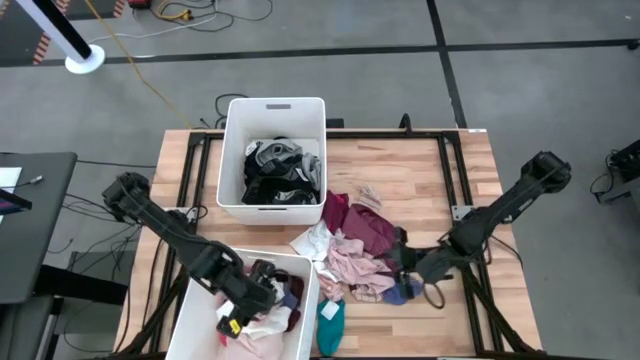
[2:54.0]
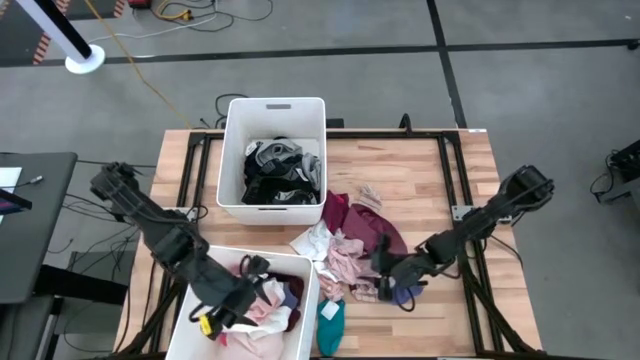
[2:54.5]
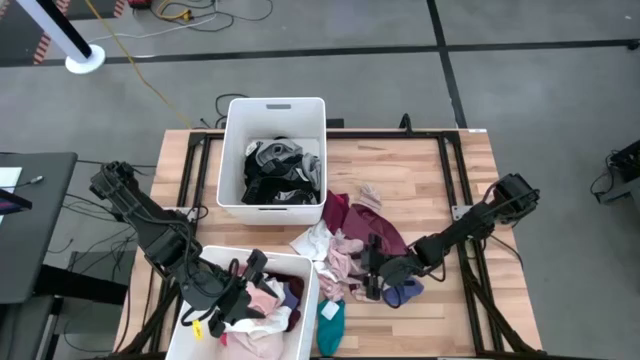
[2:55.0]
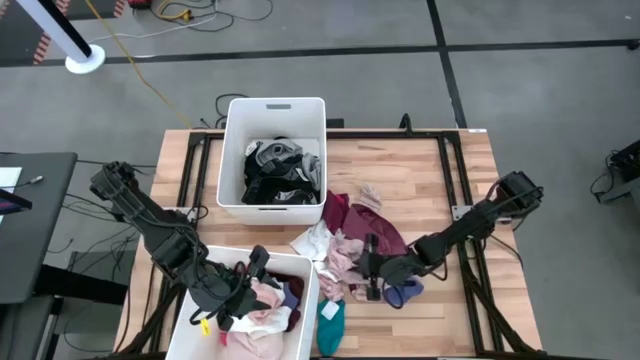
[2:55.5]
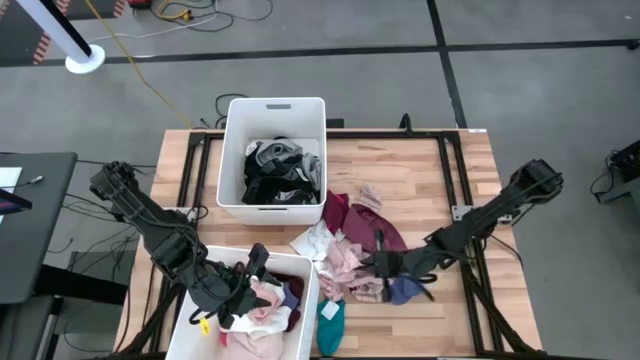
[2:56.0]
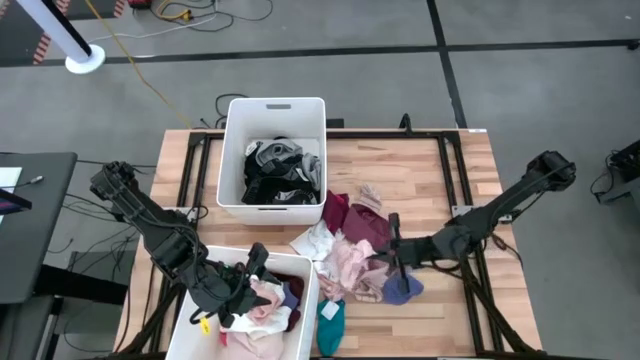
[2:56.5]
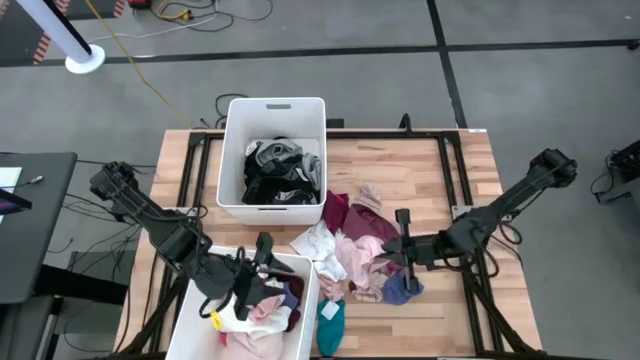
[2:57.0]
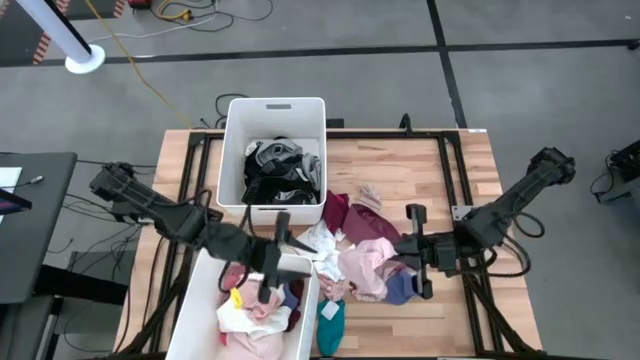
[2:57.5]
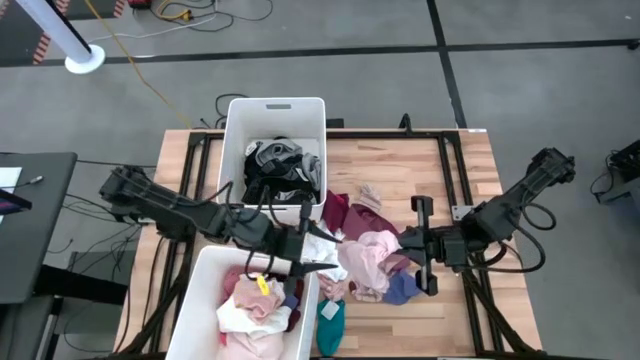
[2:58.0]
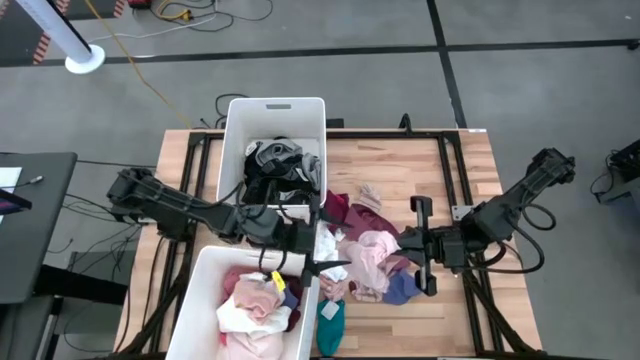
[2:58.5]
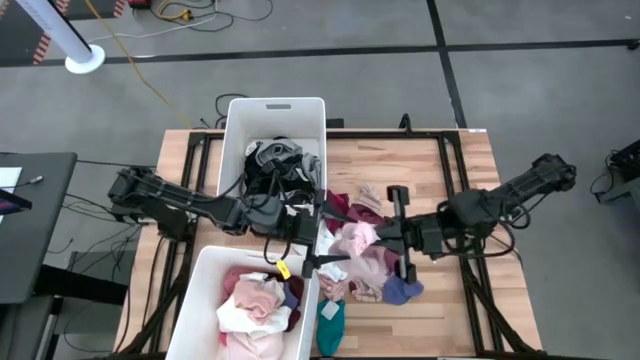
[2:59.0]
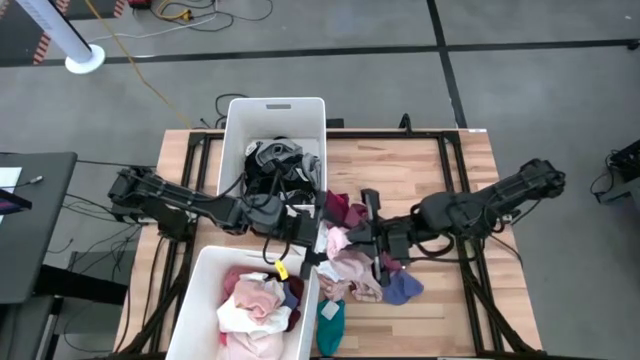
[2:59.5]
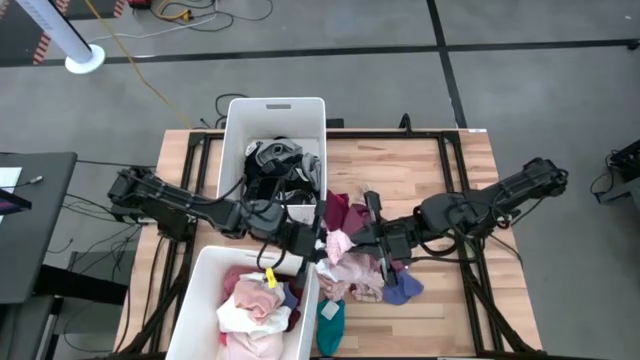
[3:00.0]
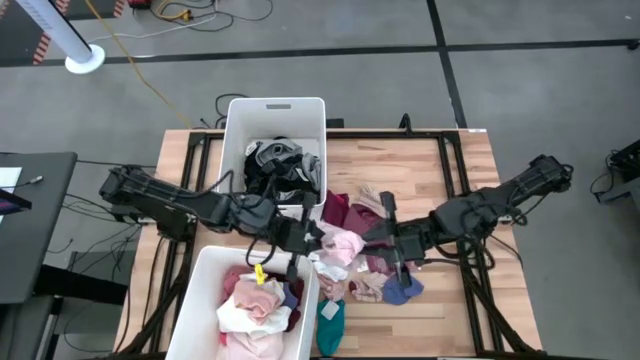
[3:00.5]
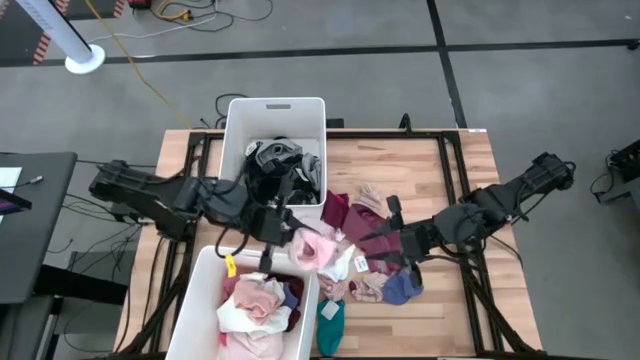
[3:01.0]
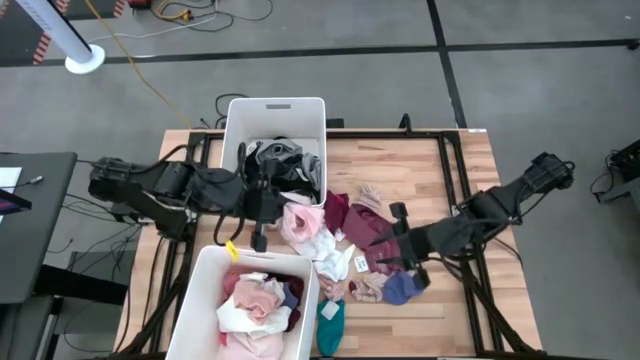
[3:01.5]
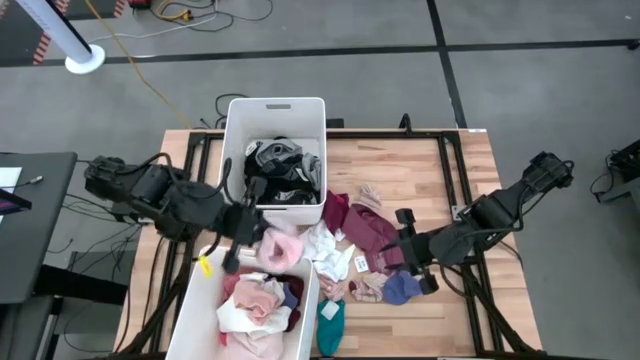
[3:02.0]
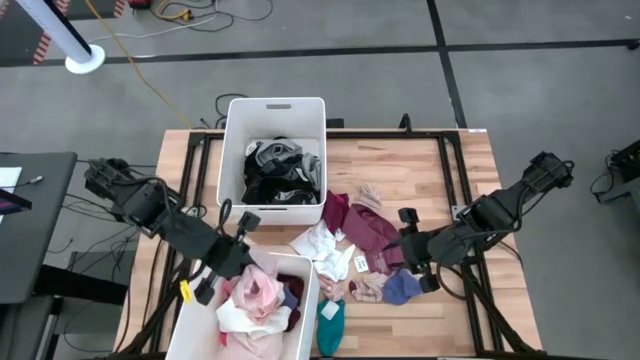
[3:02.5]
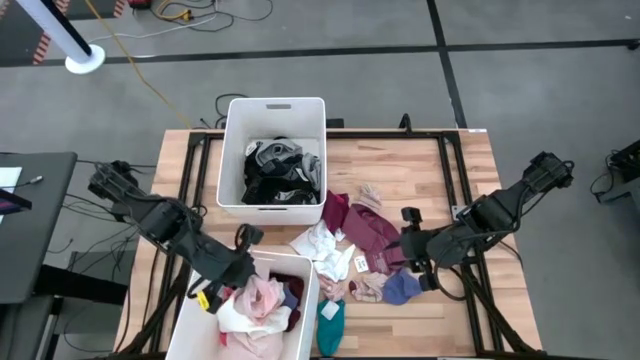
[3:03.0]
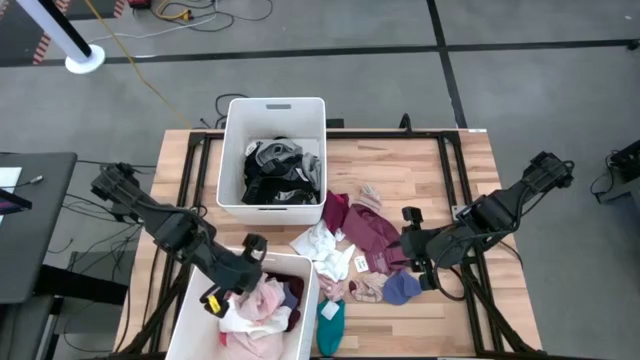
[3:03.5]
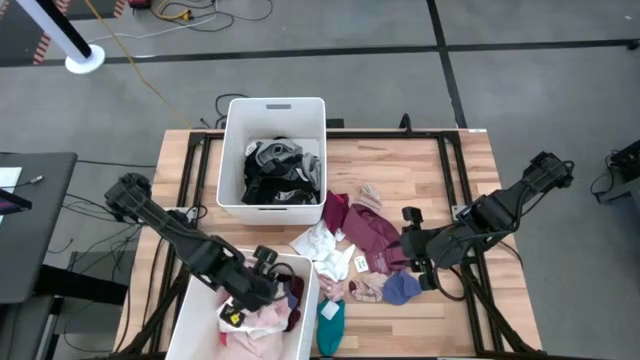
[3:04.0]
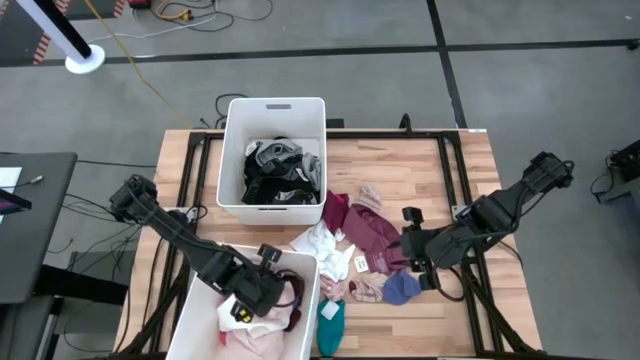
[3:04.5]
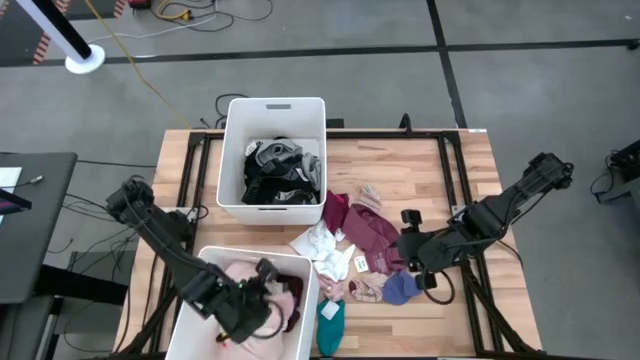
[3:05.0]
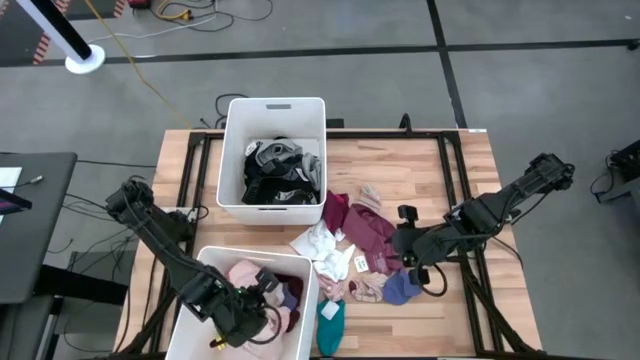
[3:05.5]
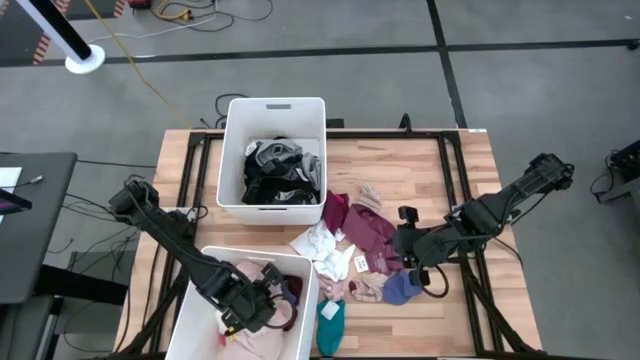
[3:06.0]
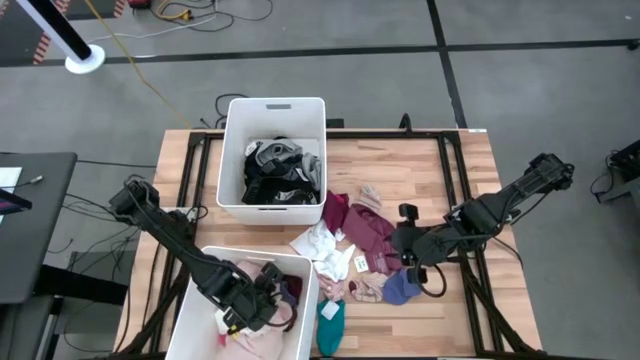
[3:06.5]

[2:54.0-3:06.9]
Task: Sort clothes
Put the pink underwear into the bottom white laundry bin
